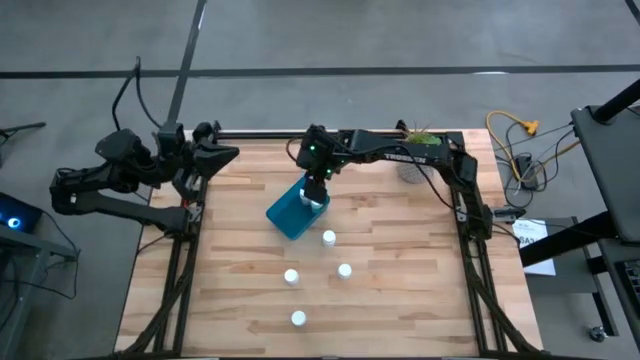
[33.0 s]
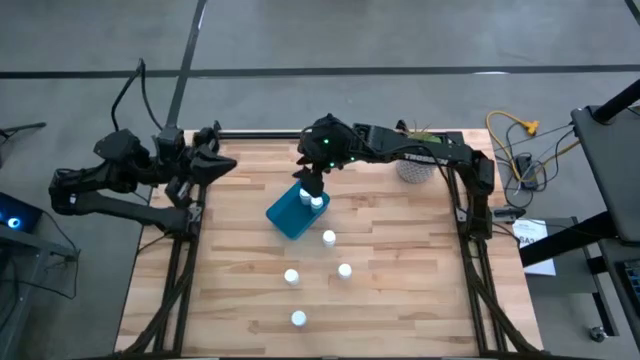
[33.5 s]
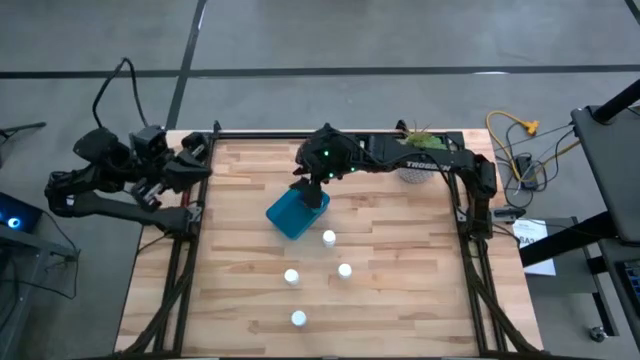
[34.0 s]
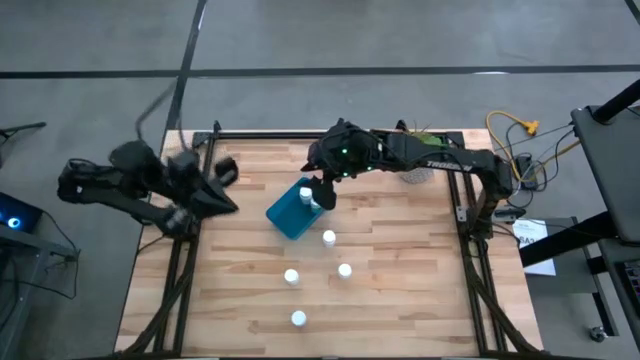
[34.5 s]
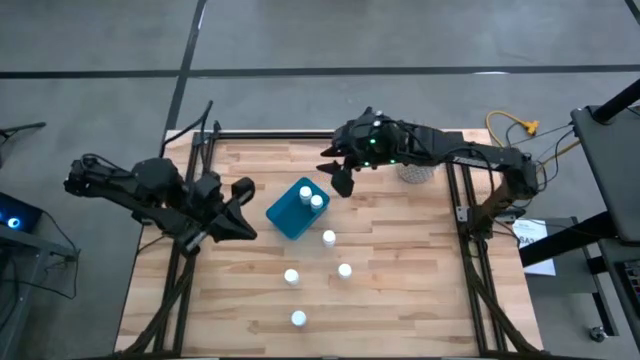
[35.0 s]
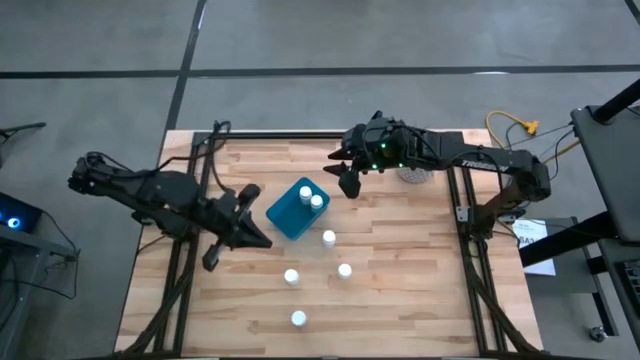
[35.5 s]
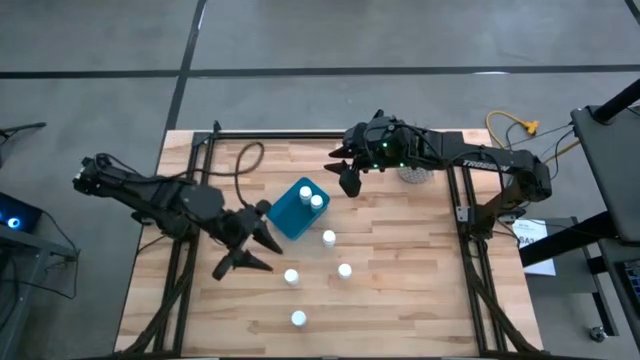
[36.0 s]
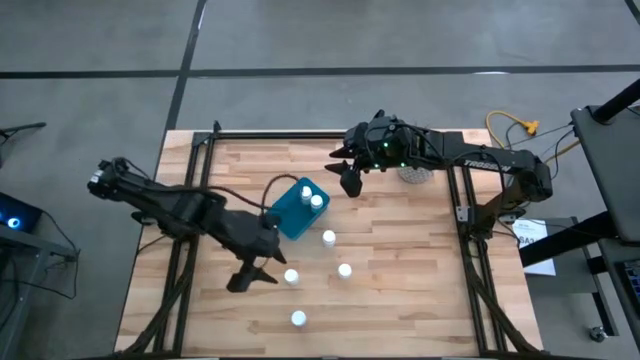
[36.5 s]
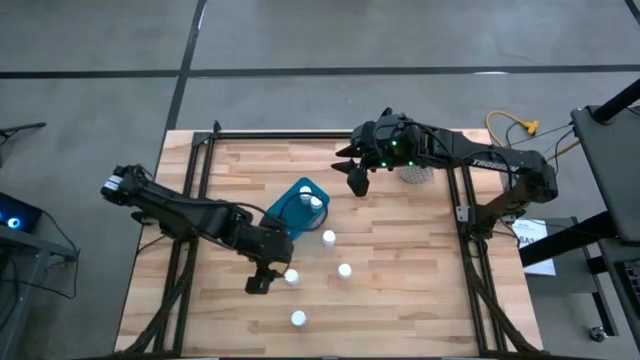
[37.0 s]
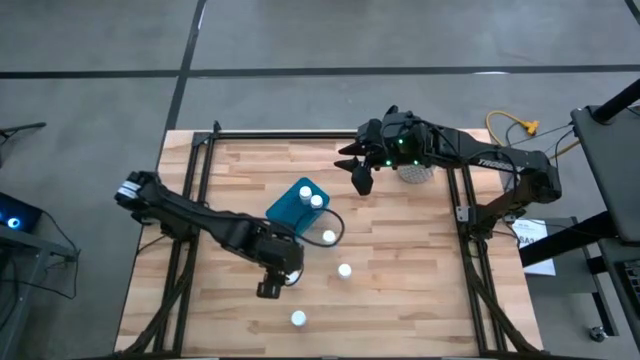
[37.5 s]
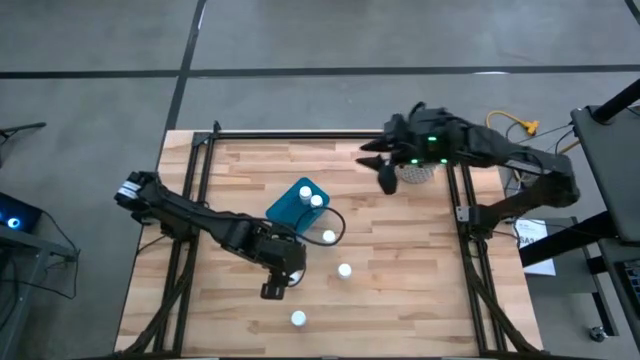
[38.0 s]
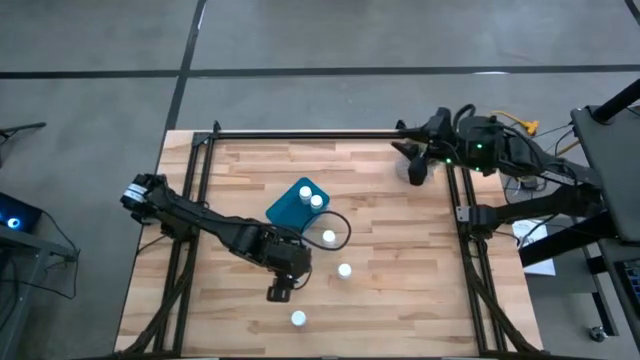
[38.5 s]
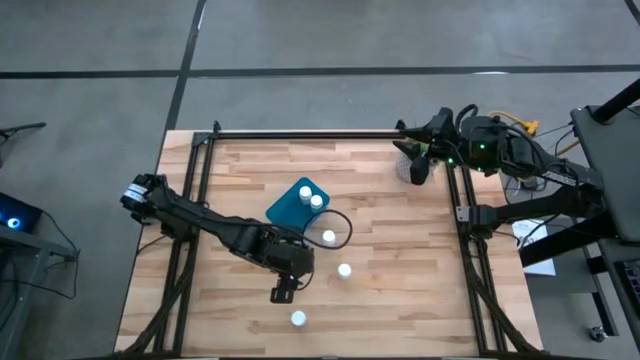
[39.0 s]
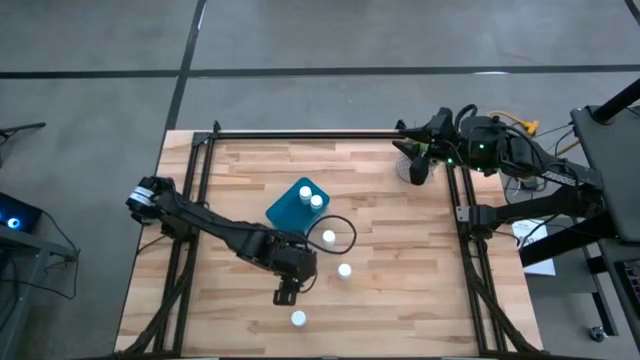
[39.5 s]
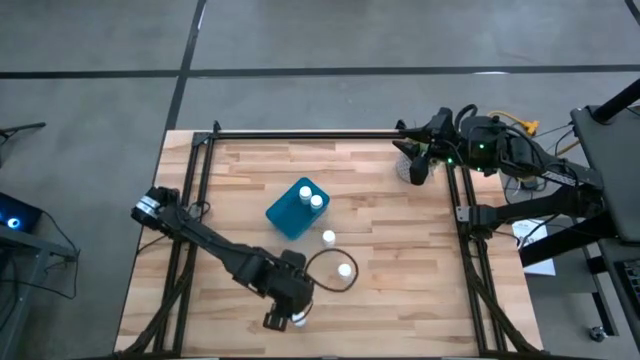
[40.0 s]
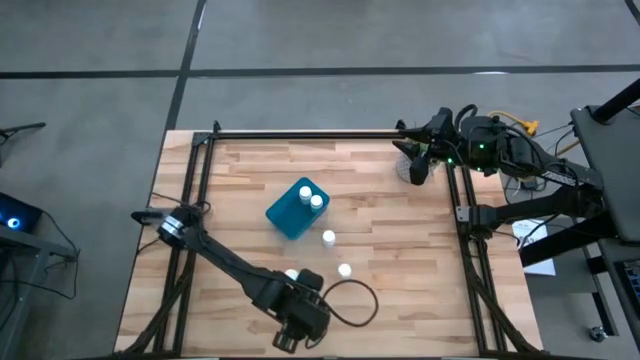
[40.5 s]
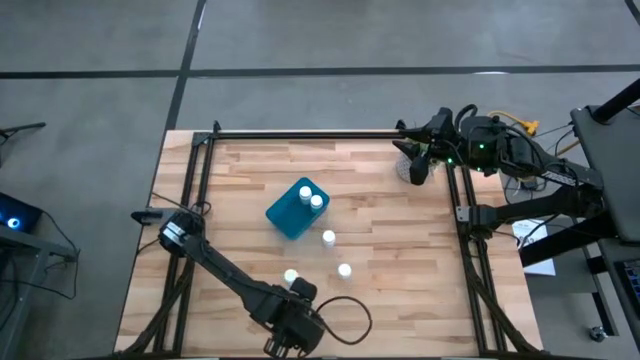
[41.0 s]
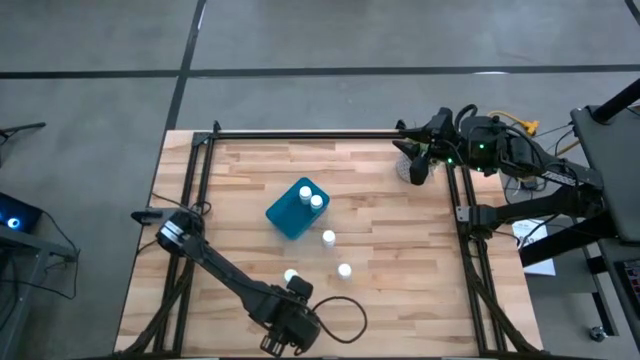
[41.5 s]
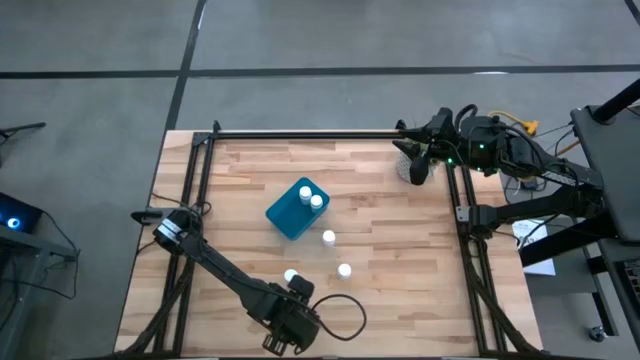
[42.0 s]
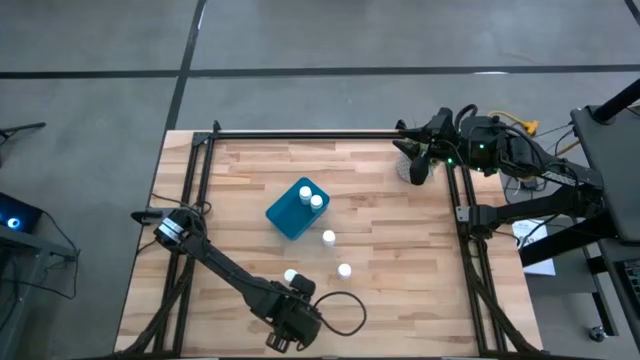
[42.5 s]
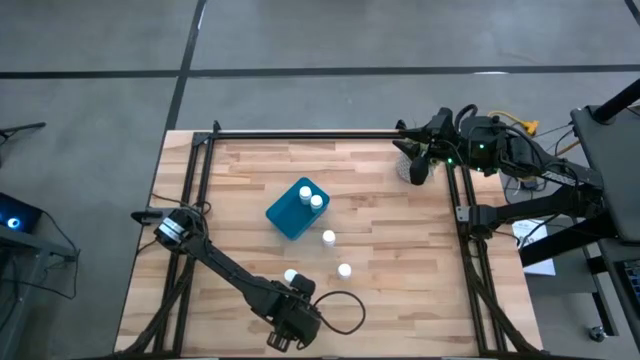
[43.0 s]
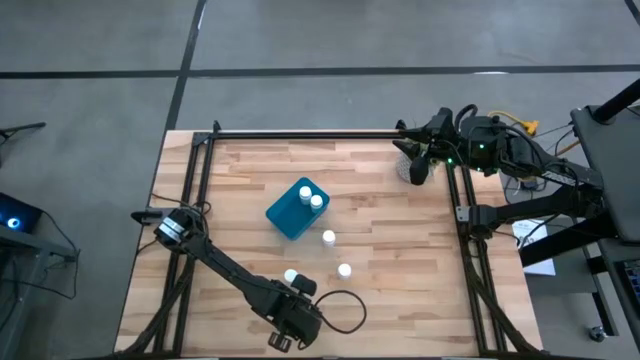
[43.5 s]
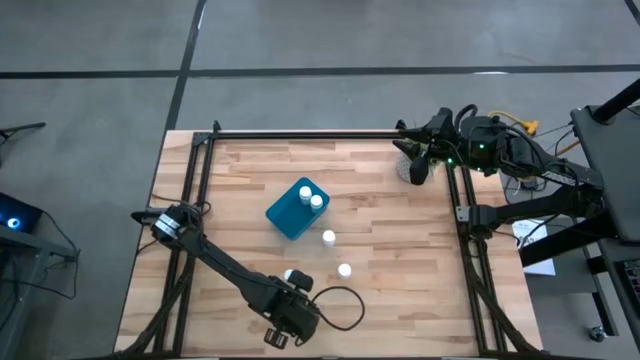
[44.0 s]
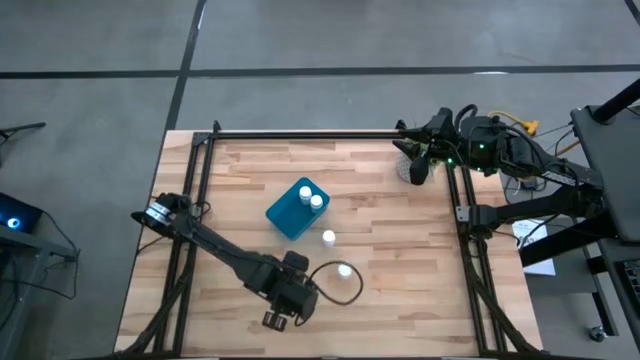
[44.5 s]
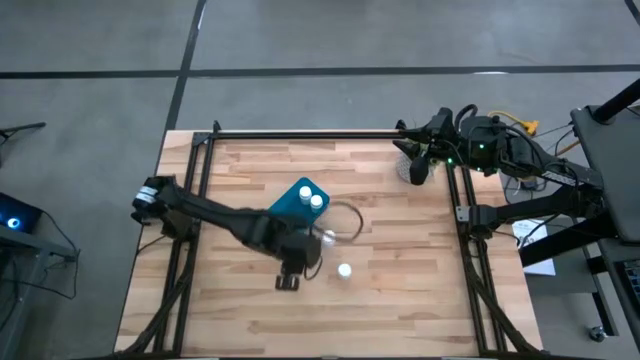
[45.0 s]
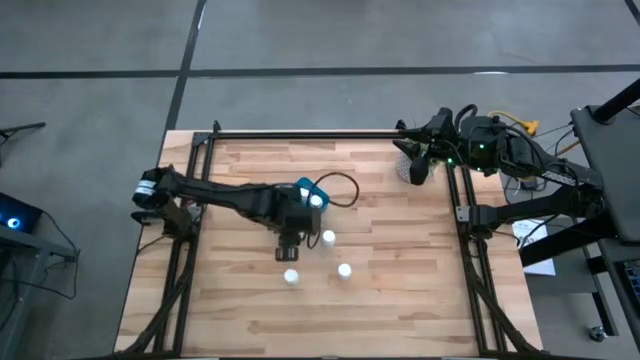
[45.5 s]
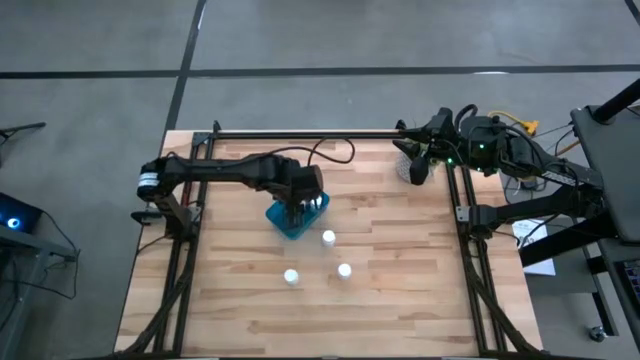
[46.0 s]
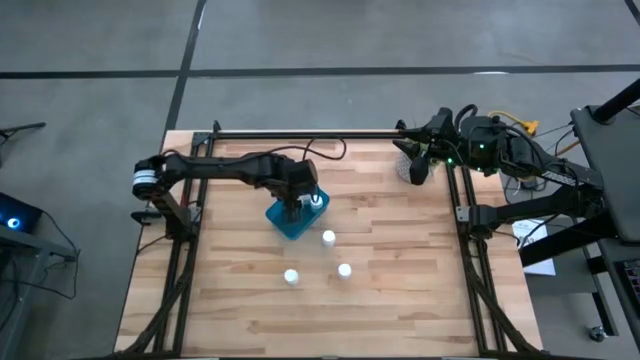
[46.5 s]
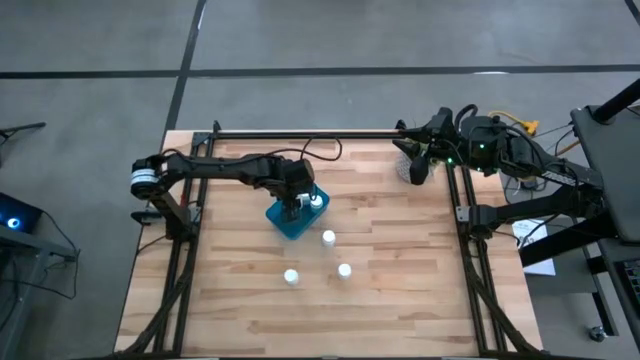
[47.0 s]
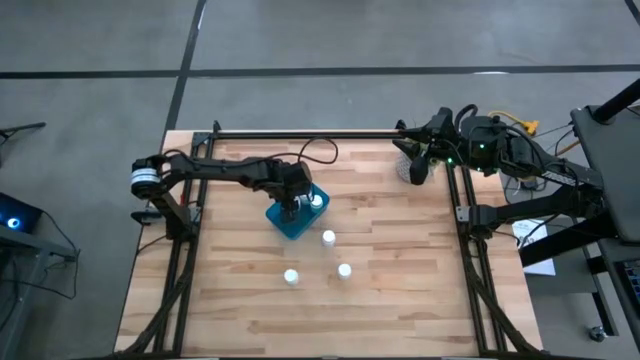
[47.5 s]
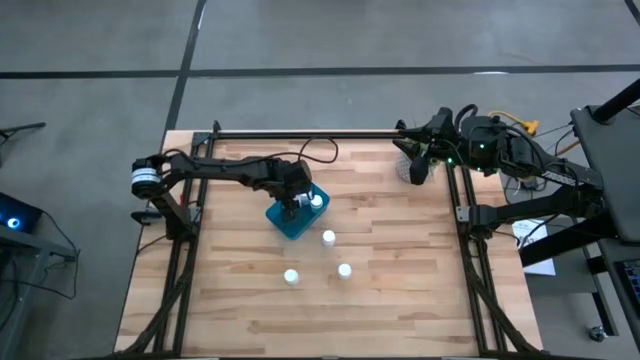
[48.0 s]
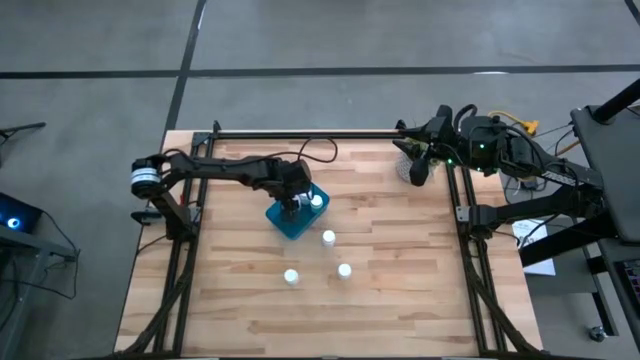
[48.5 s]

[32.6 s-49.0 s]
Task: Pick and place pill bottles into a basket
Put the bottom white pill bottle into the blue container

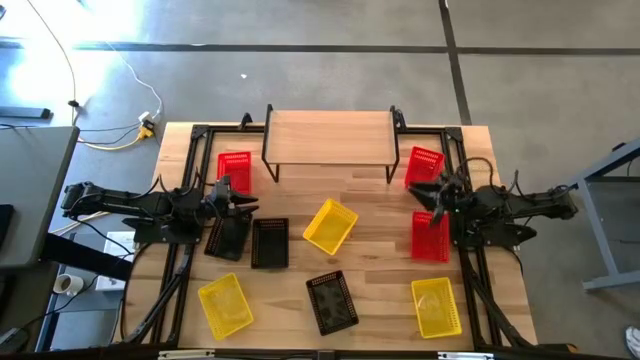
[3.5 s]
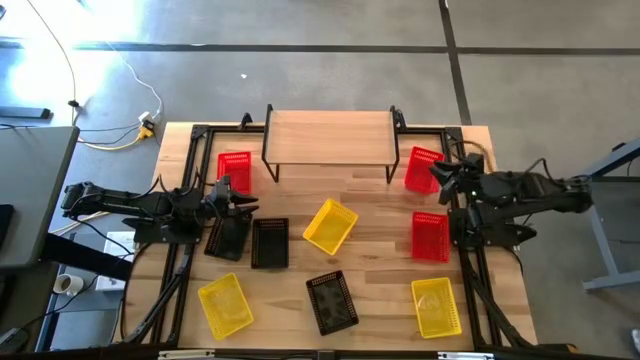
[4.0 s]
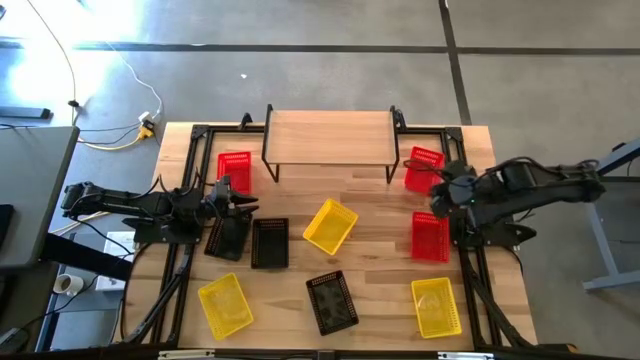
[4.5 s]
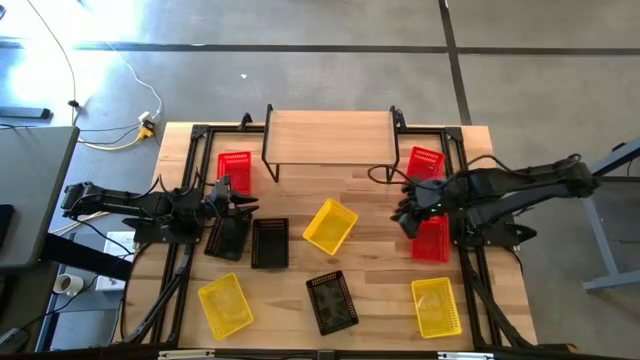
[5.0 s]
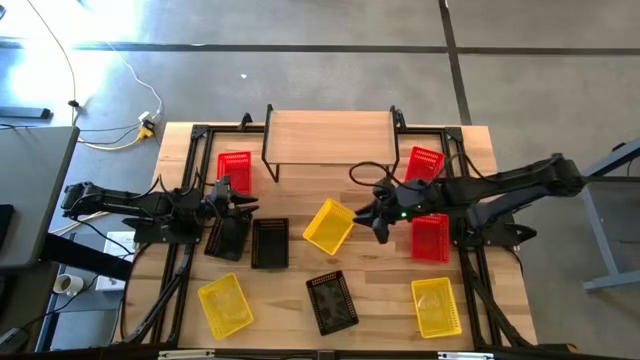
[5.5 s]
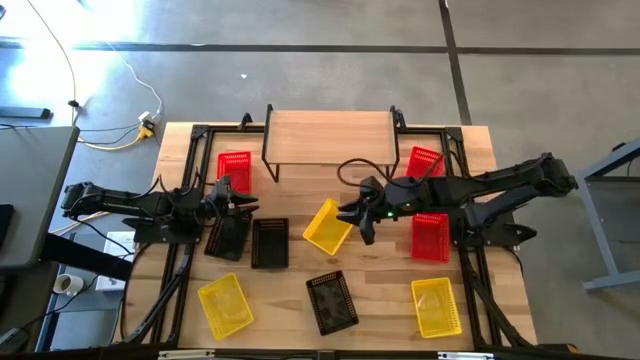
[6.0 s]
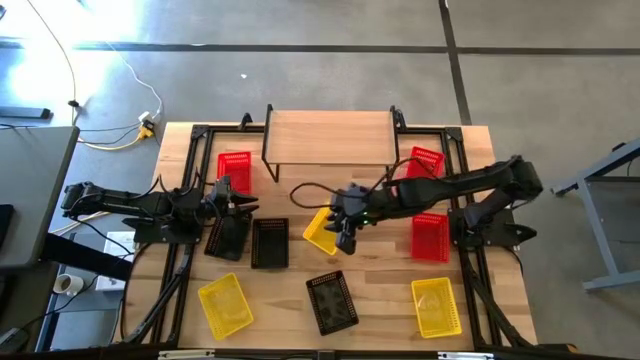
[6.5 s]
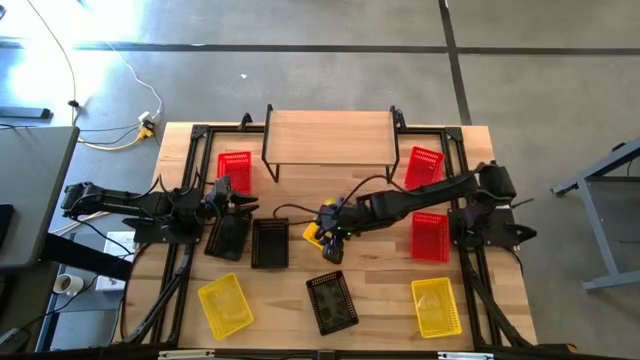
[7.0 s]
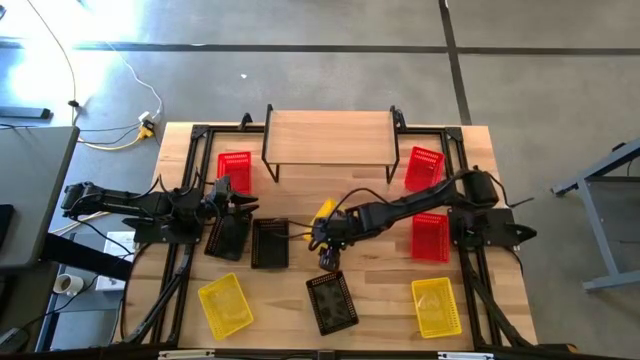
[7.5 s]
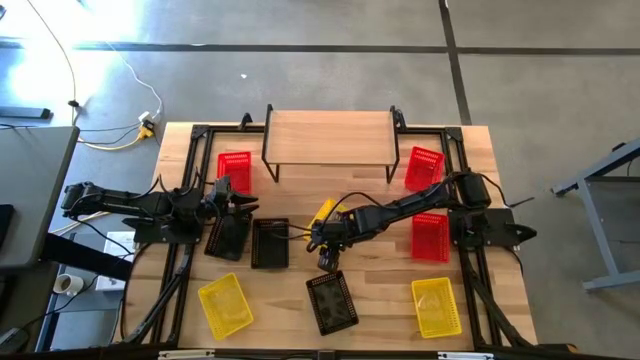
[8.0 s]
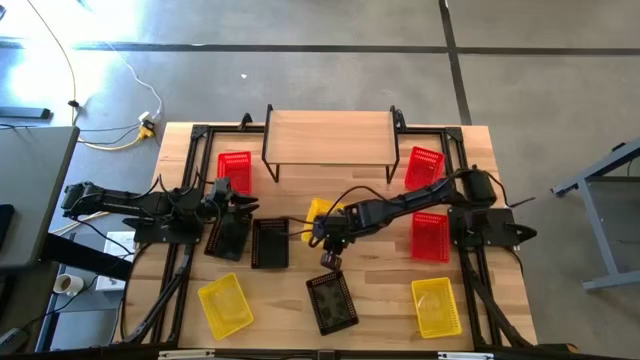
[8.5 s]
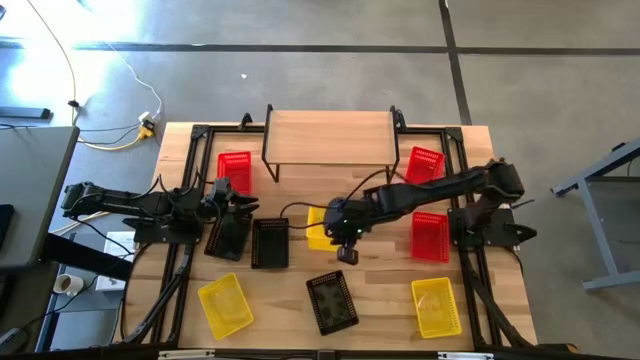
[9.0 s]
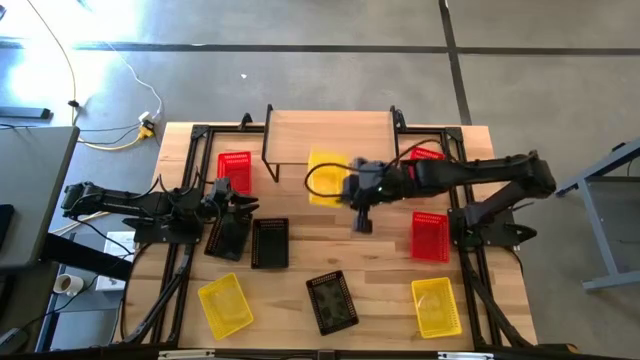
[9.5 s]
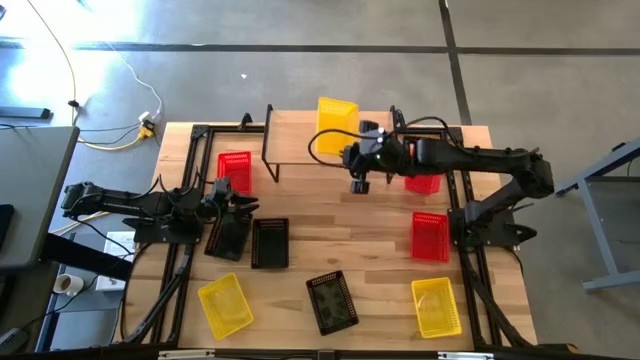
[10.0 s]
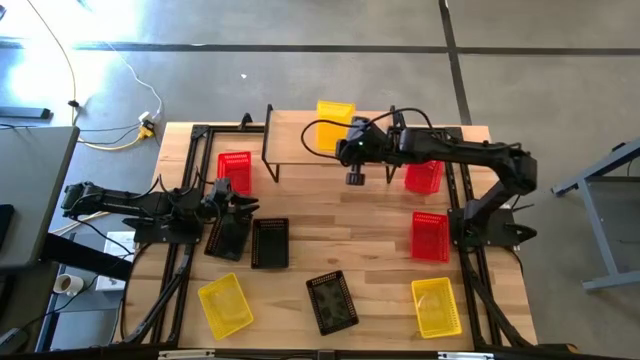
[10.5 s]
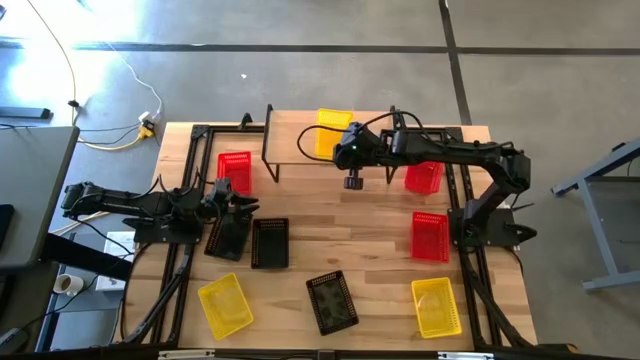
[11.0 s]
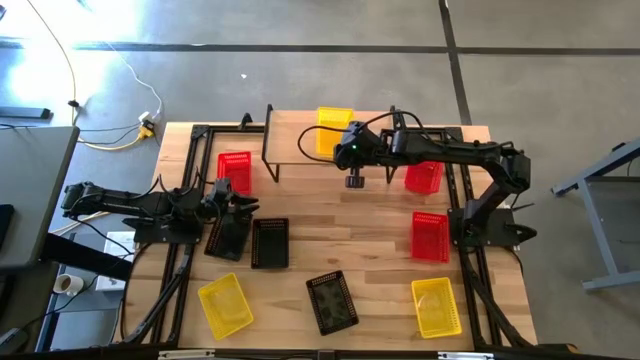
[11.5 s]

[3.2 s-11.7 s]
Task: Stack baskets on shelf by color
Put the top yellow bin on the shelf
